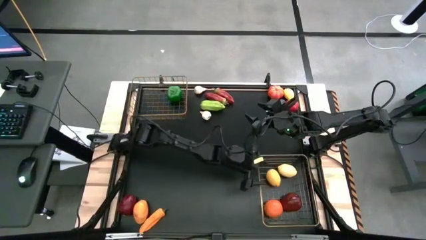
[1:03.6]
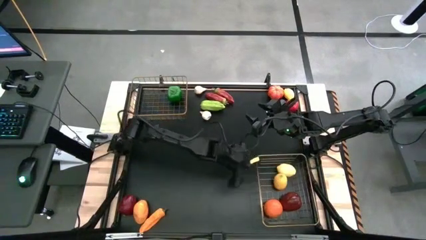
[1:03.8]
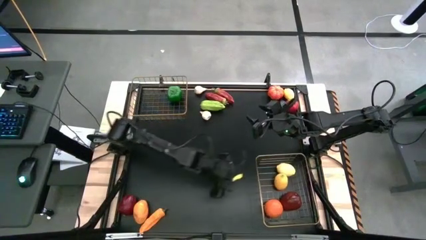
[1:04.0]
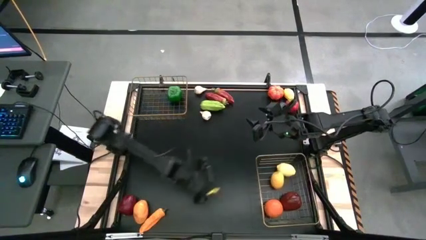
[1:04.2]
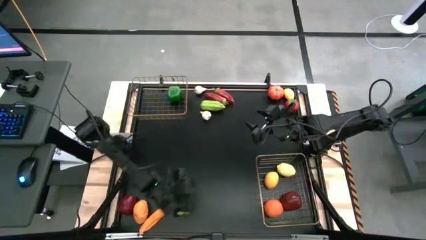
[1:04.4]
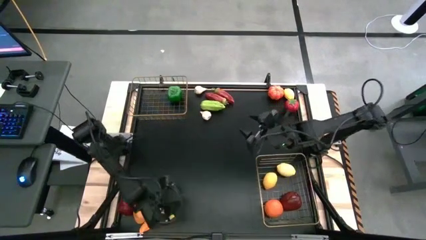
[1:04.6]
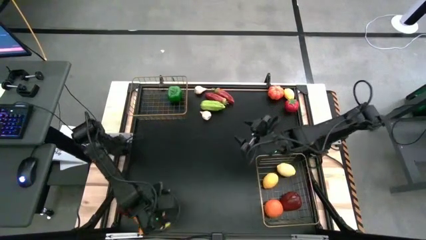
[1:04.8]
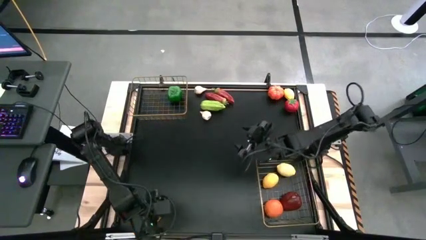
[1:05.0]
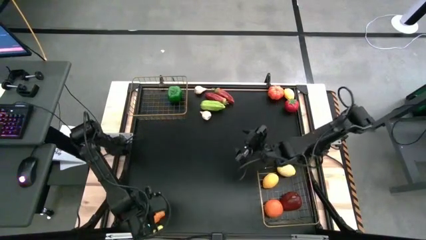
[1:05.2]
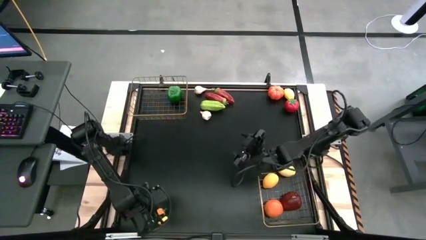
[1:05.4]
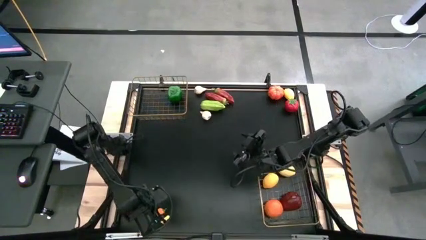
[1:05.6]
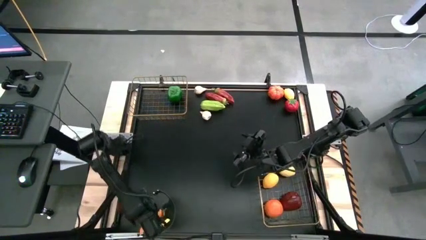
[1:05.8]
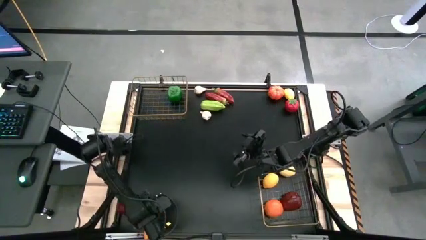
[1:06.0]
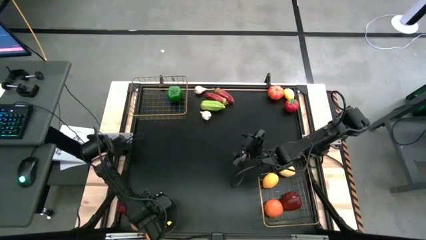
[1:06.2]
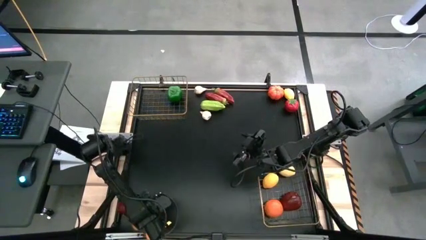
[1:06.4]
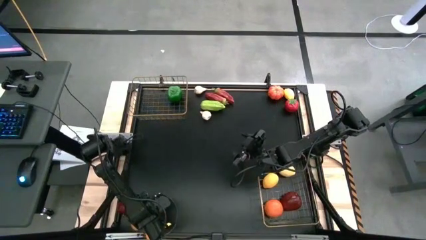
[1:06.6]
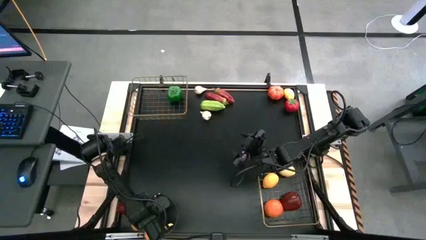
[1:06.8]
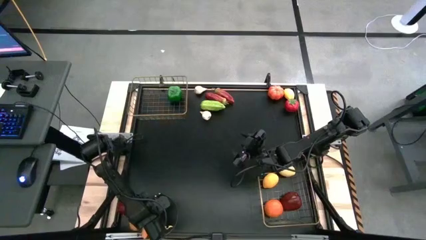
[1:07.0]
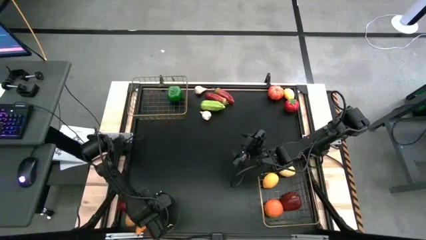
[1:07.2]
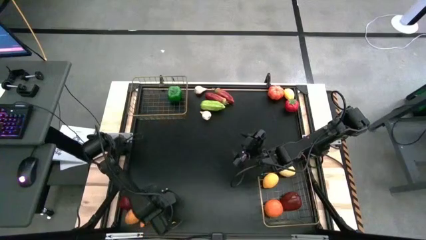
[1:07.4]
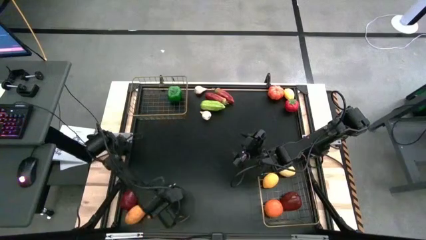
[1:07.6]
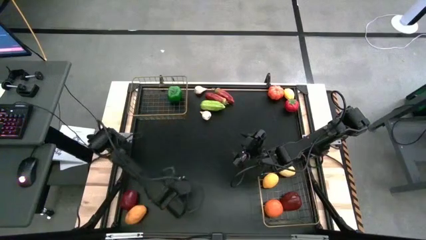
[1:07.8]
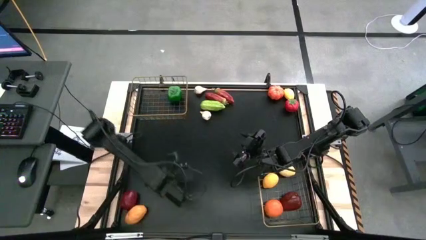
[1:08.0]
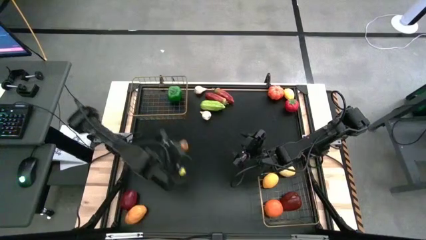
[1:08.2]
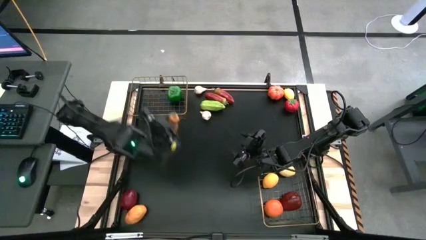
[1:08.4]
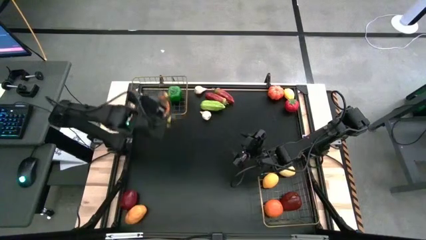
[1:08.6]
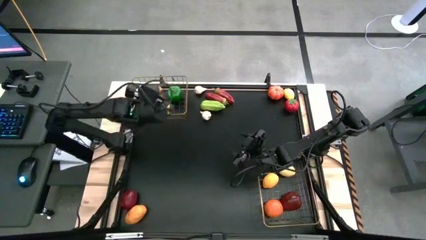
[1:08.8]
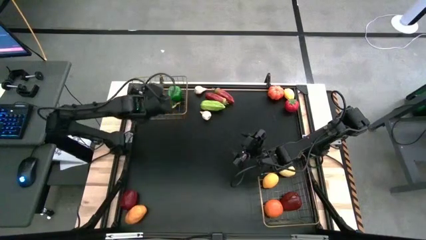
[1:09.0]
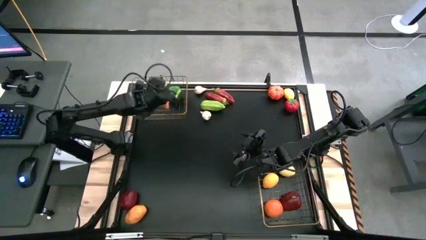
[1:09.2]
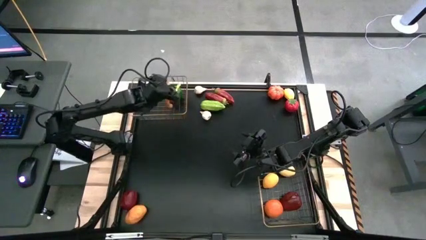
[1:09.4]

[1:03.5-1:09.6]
Task: Sort produce into baskets
Put the orange chili pepper into the top wire basket

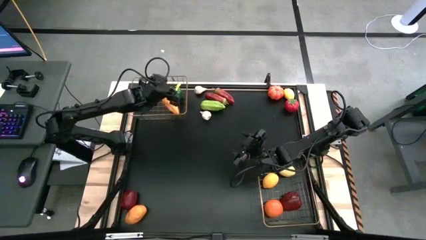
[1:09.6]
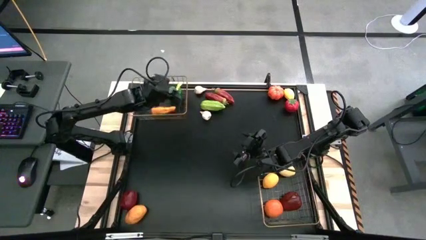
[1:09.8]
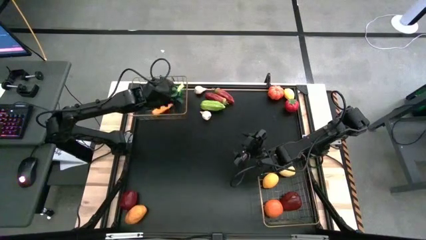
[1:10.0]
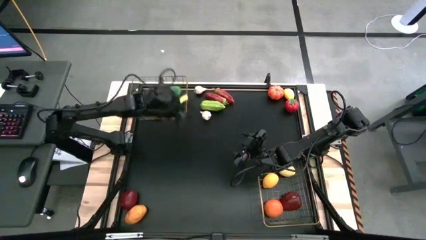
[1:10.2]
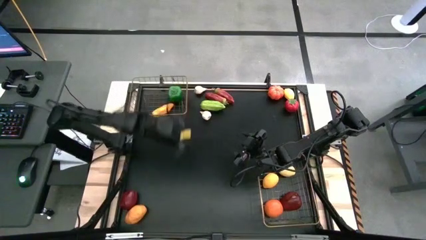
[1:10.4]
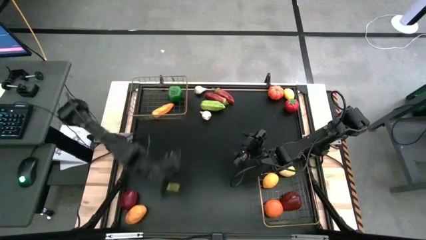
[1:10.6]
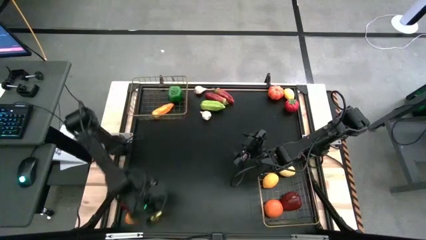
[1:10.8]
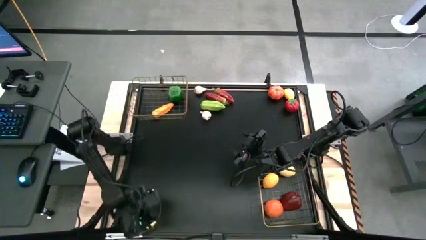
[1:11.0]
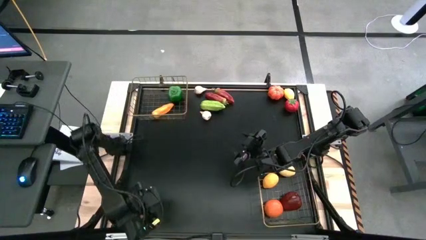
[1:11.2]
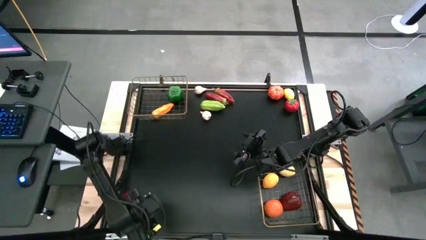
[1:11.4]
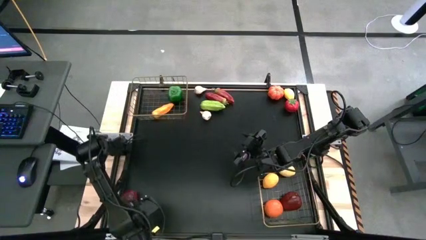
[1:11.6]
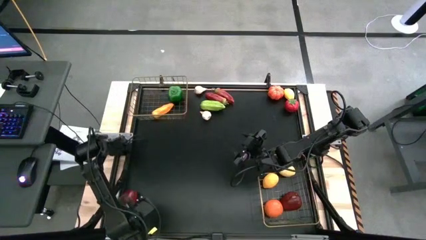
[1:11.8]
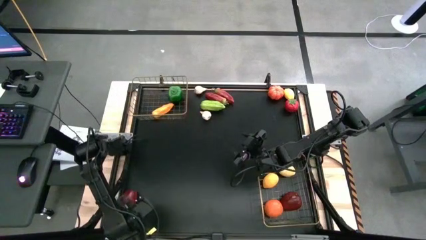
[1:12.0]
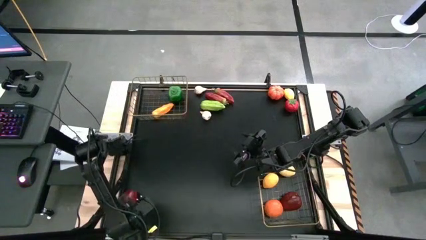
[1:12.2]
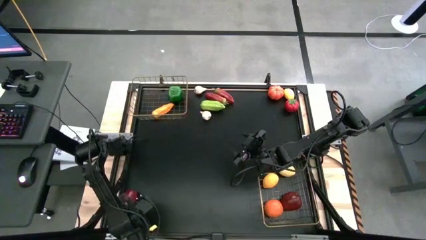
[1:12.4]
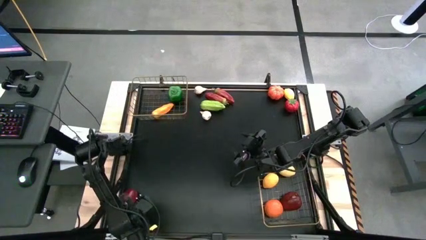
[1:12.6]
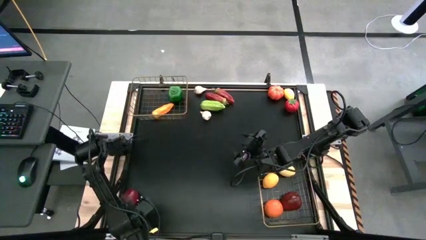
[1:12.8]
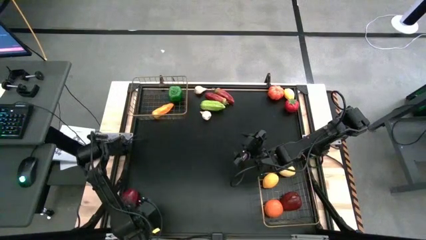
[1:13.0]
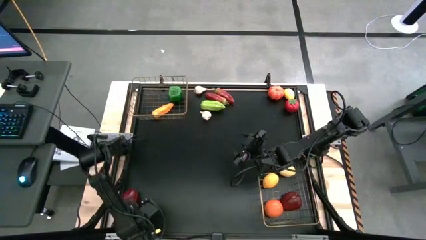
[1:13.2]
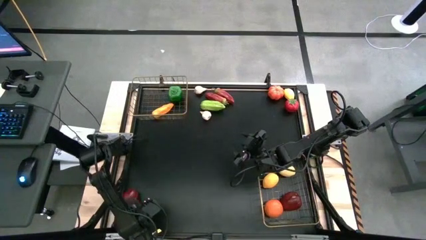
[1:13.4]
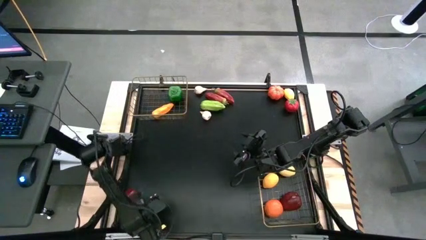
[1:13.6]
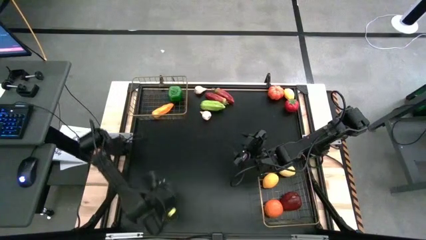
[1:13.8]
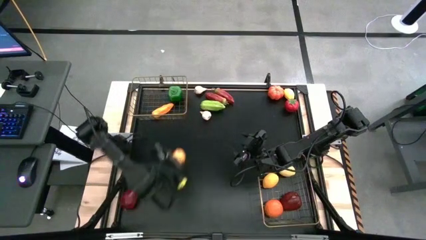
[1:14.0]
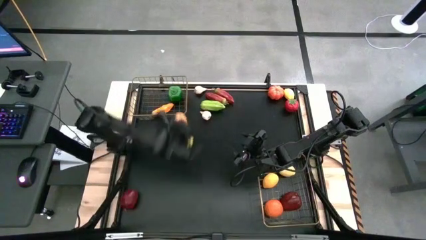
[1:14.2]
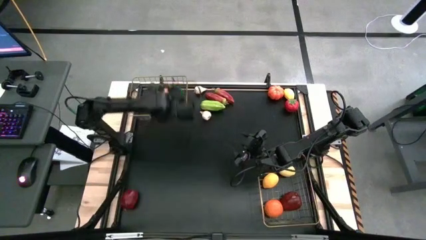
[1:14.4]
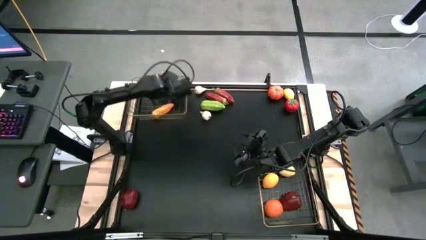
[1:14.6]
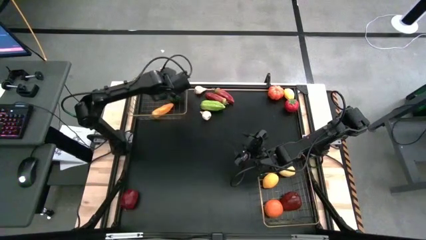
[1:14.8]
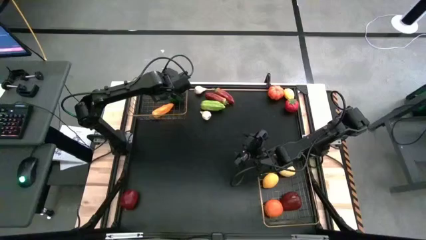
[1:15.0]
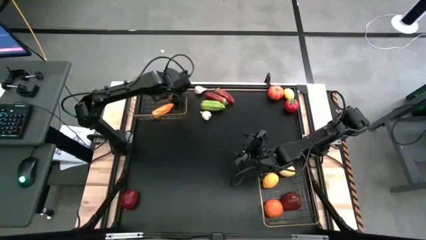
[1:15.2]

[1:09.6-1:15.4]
Put the yellow mango into the top wire basket

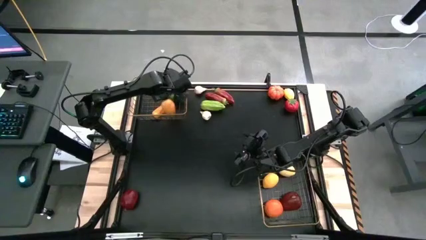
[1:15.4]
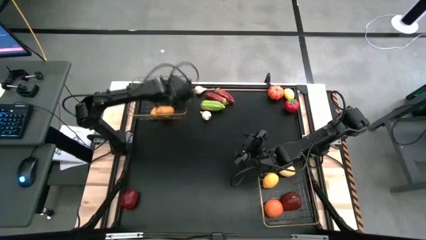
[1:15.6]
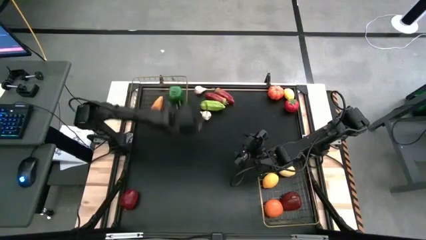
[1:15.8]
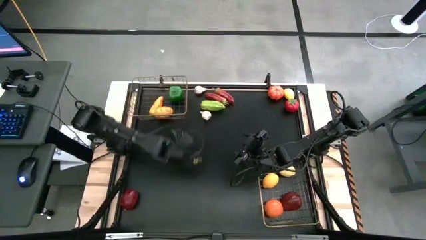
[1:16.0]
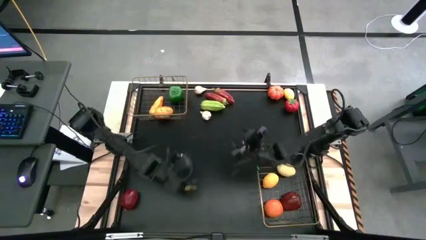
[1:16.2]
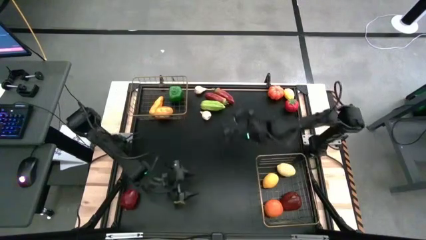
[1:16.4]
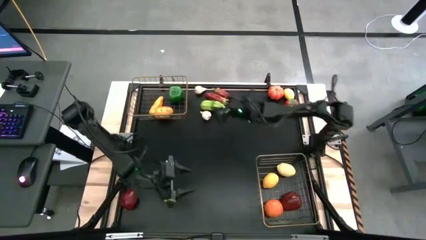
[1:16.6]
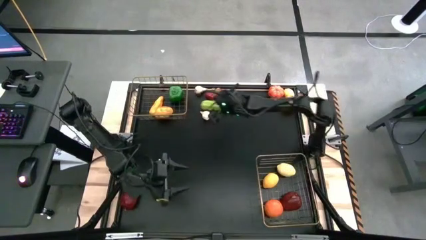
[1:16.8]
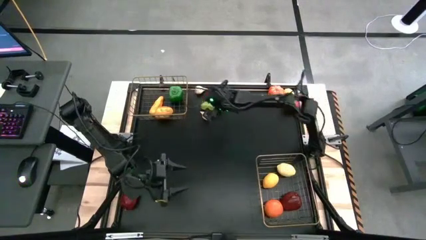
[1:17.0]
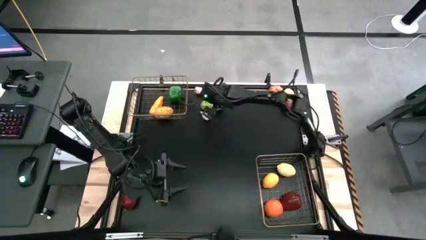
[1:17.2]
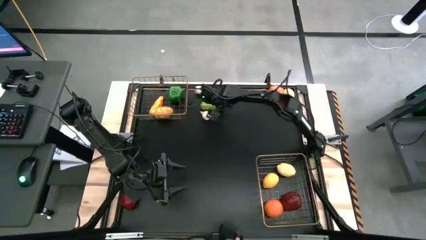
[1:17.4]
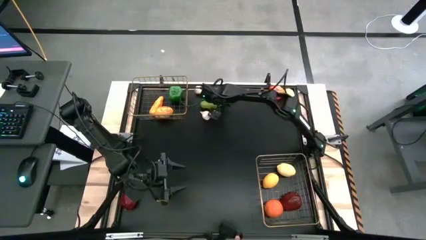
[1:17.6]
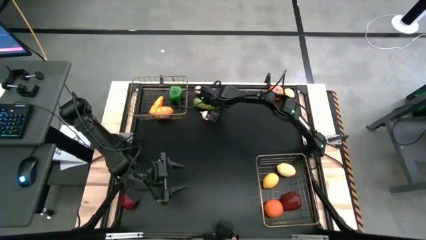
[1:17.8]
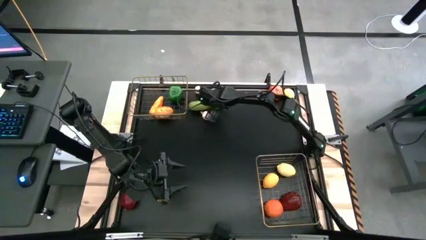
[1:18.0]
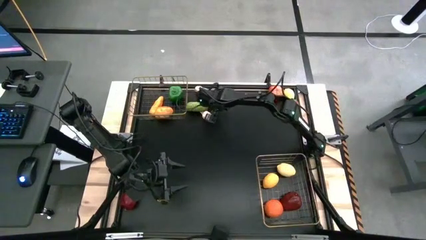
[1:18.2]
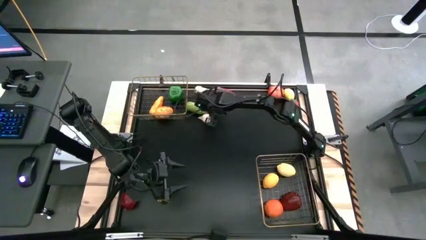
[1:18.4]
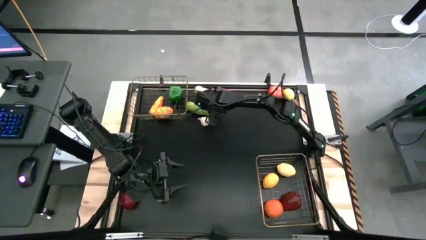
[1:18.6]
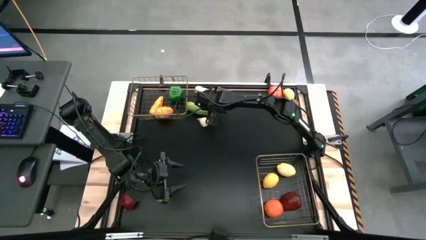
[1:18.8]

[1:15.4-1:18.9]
Put the bottom red chili pepper into the top wire basket

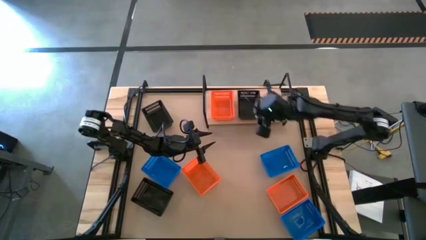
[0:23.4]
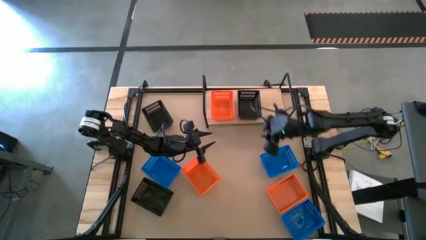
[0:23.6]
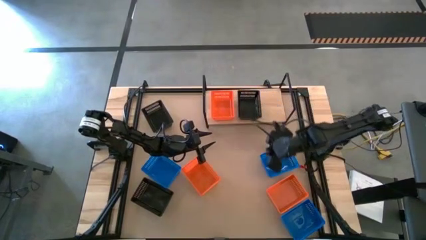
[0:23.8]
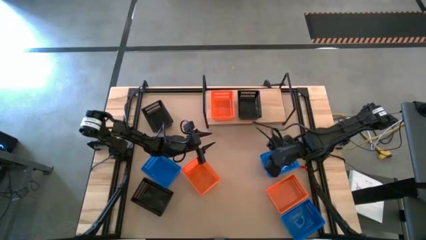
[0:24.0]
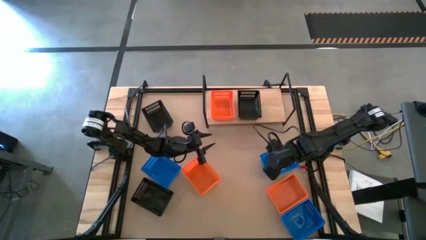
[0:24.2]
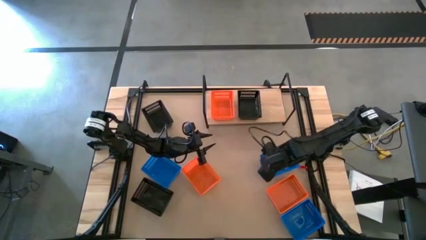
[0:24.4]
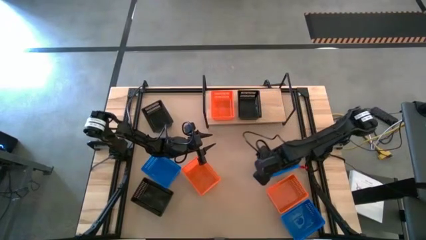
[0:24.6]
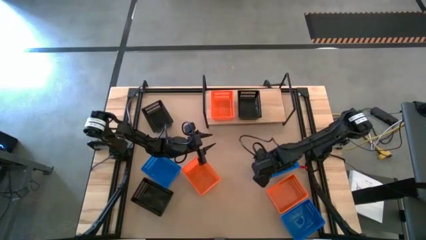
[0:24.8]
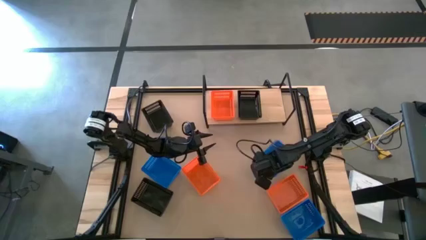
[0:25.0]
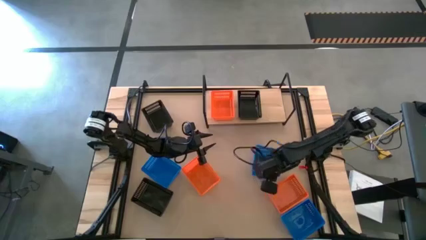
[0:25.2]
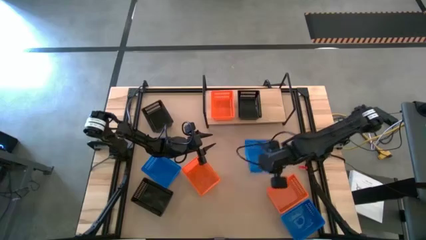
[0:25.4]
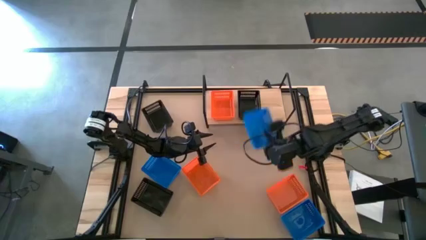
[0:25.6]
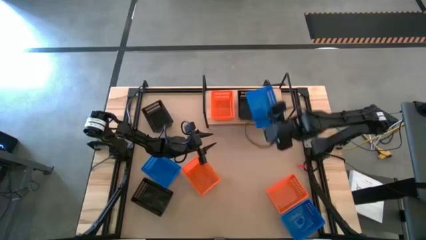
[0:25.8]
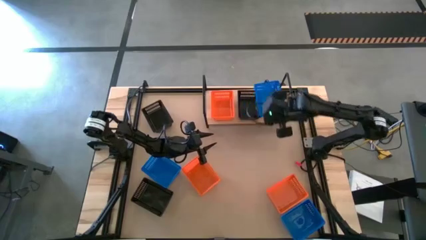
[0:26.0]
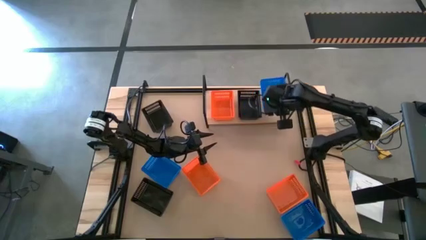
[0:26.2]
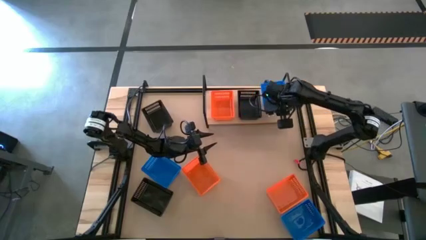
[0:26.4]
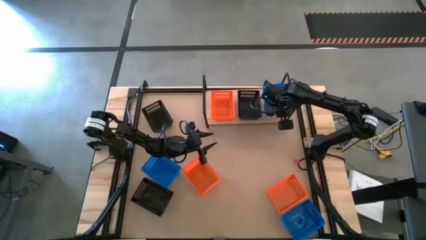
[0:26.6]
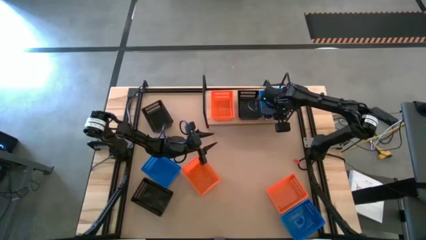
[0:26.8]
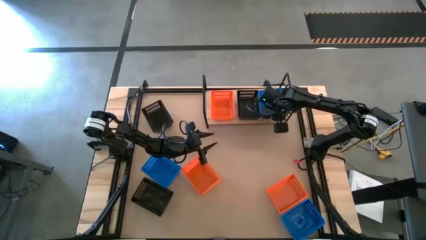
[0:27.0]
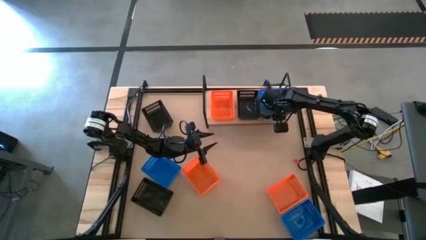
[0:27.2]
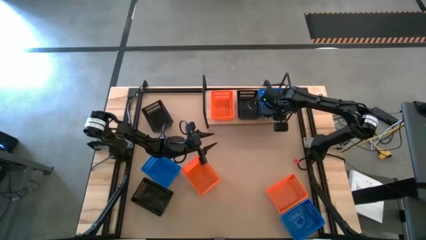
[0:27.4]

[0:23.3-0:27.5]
Task: Stack baskets on shelf by color
Put the top right blue basket on the shelf
